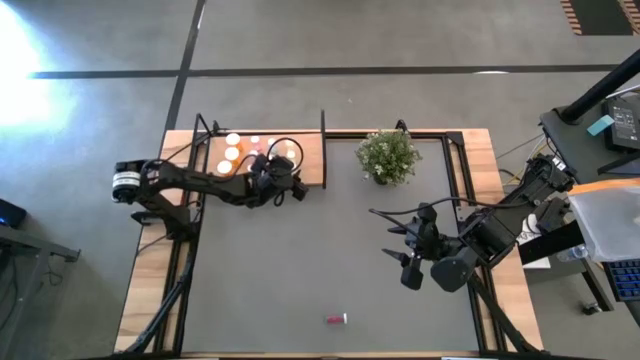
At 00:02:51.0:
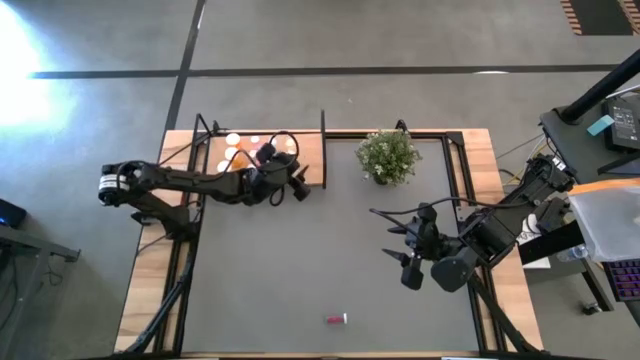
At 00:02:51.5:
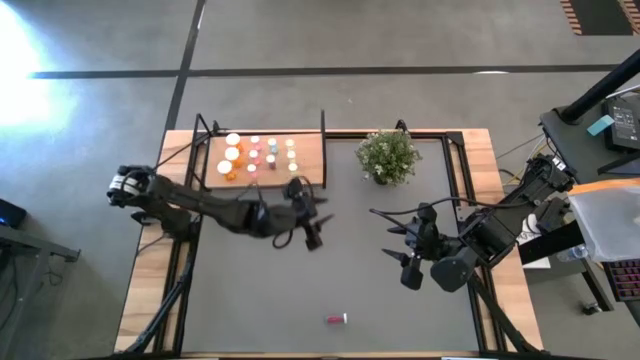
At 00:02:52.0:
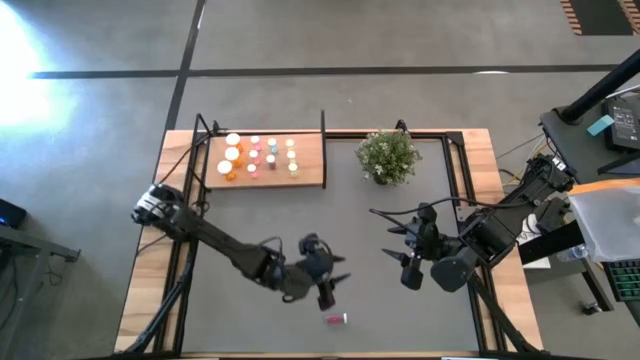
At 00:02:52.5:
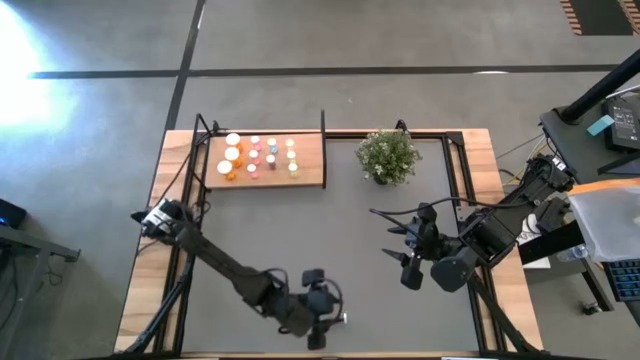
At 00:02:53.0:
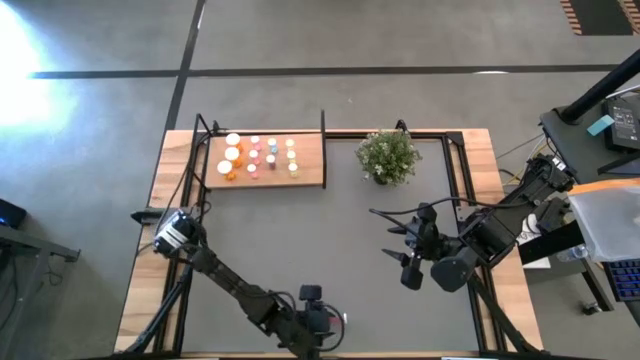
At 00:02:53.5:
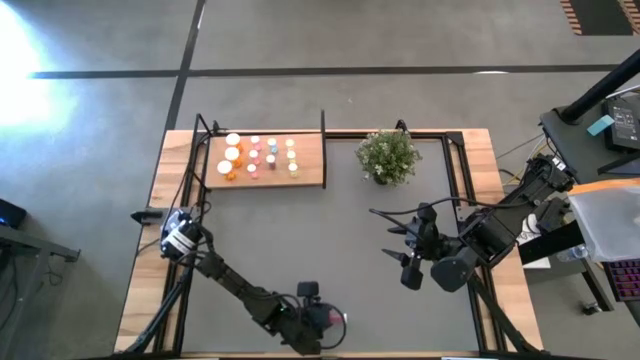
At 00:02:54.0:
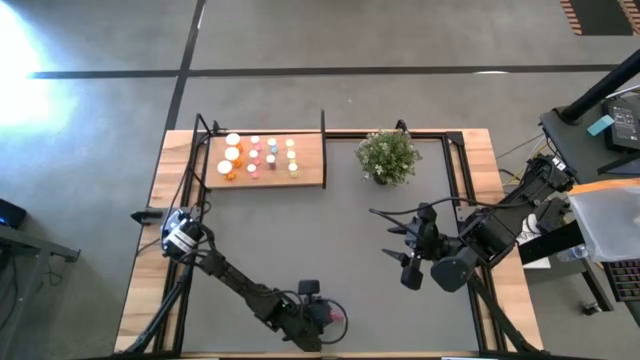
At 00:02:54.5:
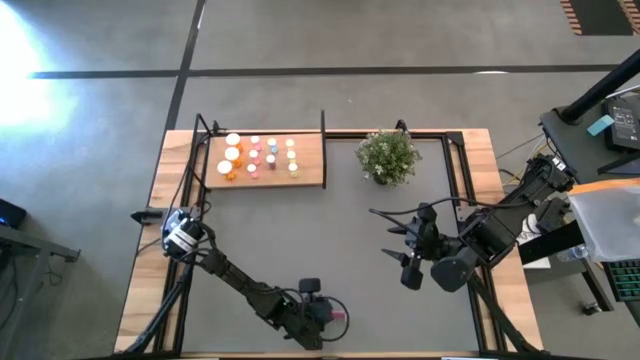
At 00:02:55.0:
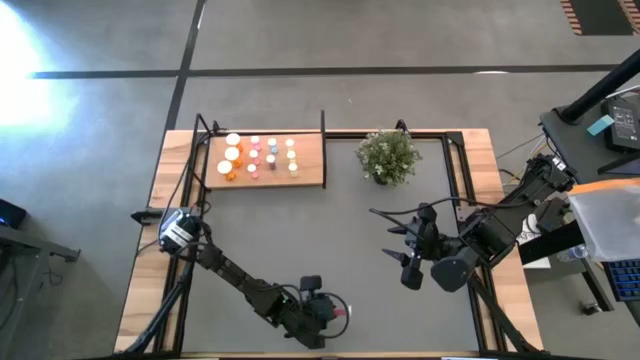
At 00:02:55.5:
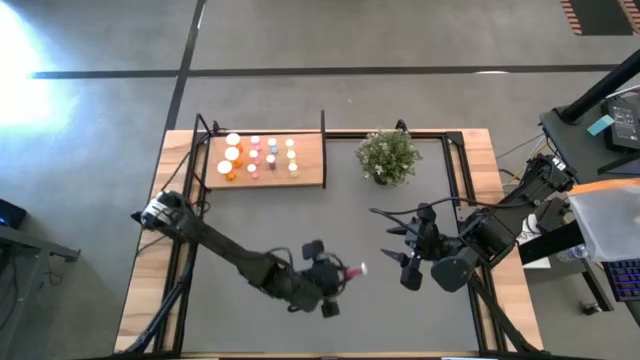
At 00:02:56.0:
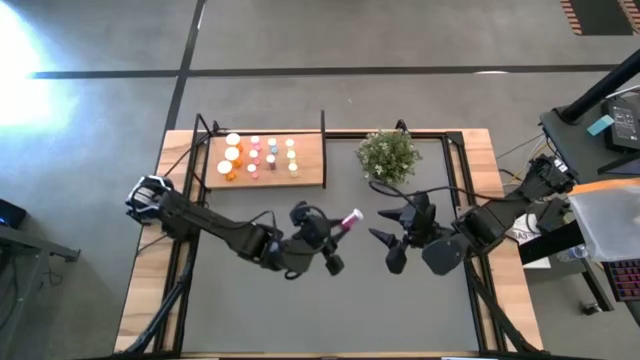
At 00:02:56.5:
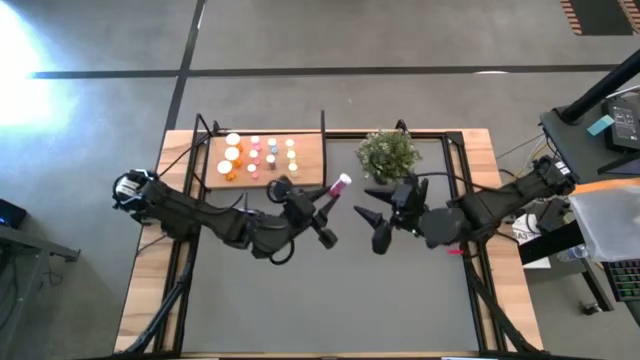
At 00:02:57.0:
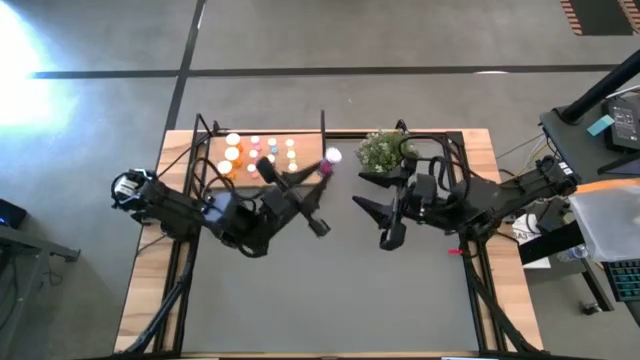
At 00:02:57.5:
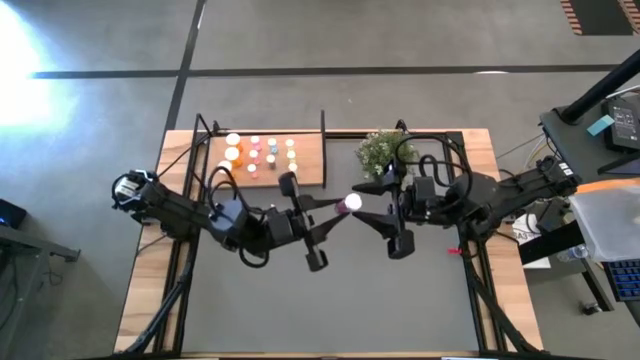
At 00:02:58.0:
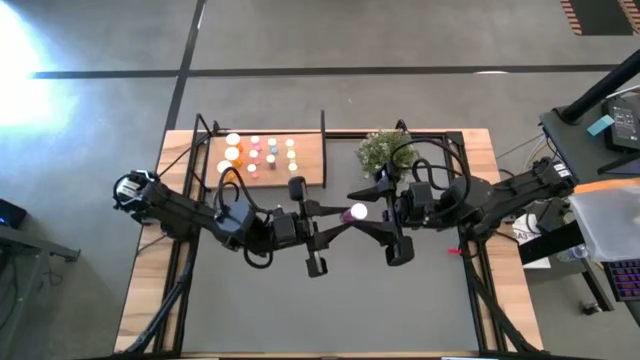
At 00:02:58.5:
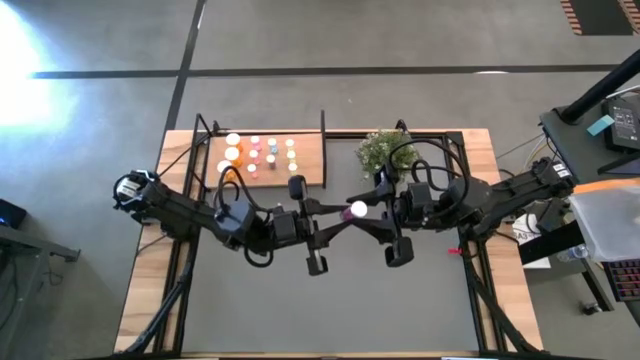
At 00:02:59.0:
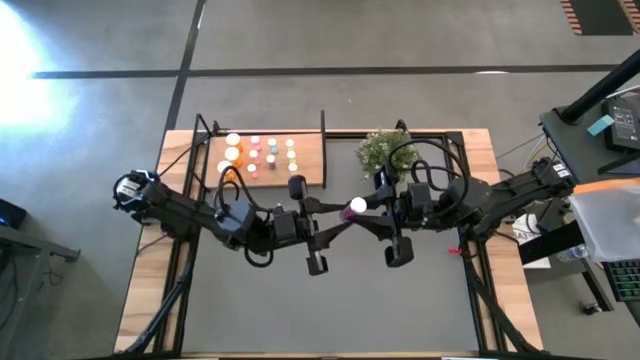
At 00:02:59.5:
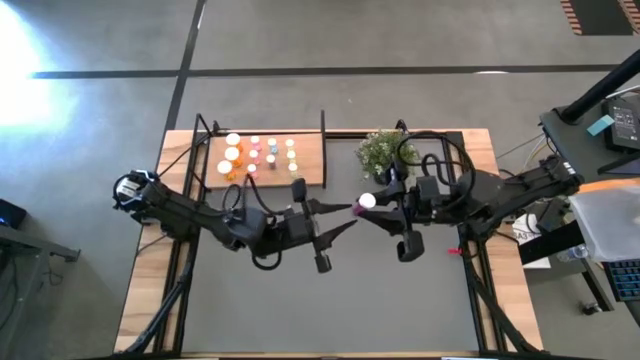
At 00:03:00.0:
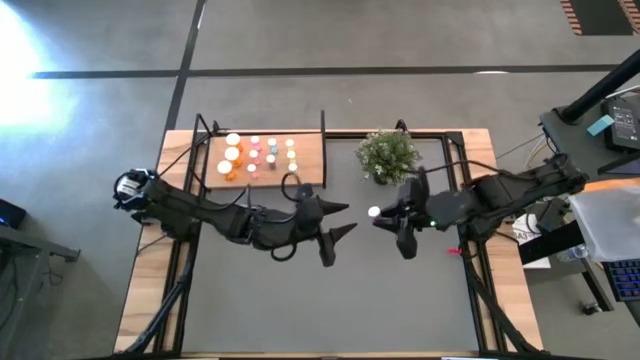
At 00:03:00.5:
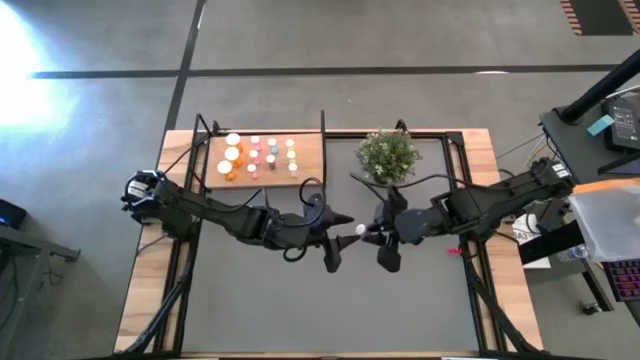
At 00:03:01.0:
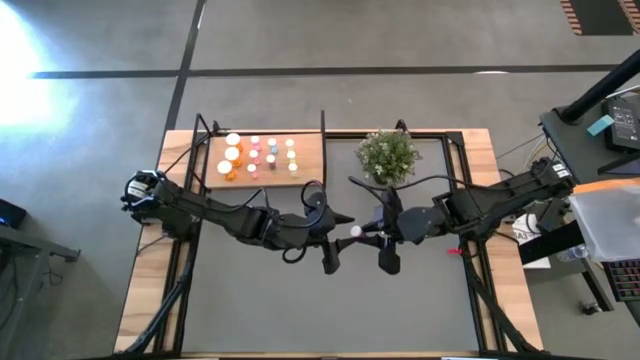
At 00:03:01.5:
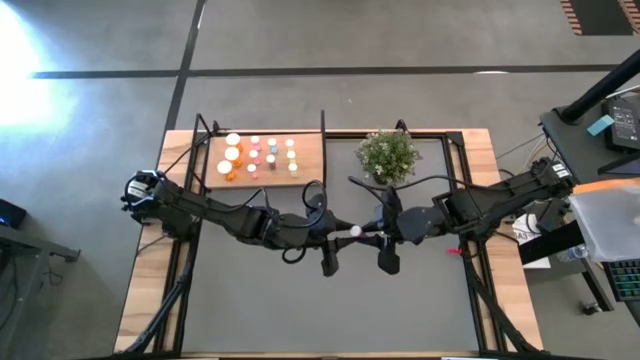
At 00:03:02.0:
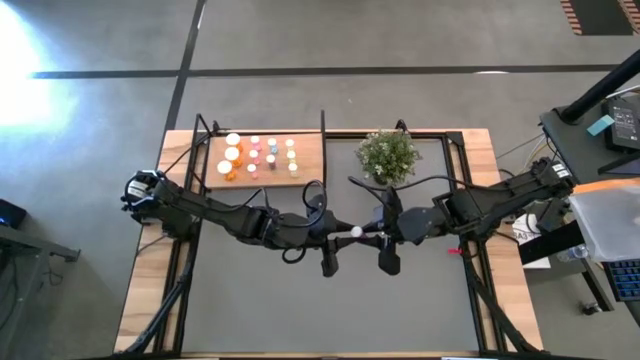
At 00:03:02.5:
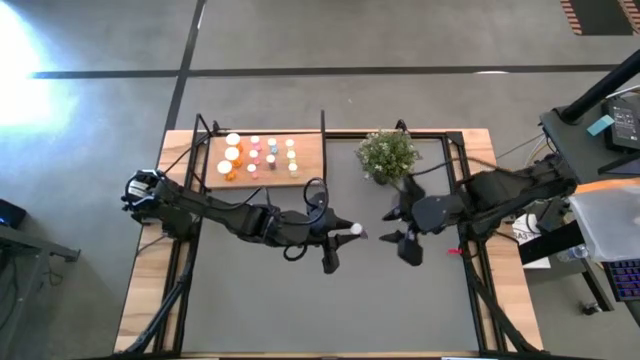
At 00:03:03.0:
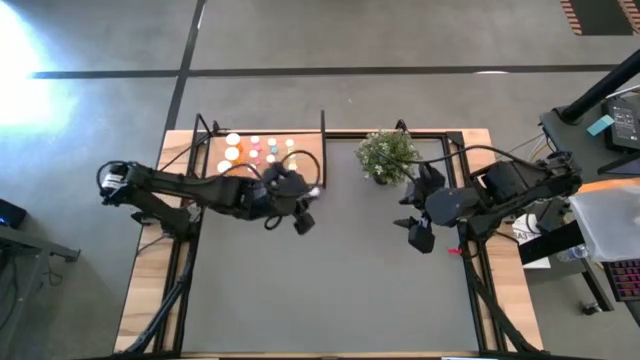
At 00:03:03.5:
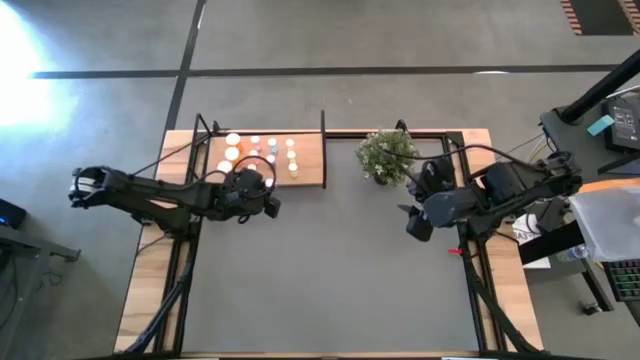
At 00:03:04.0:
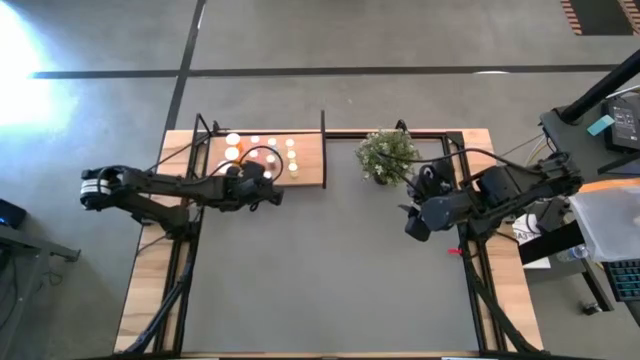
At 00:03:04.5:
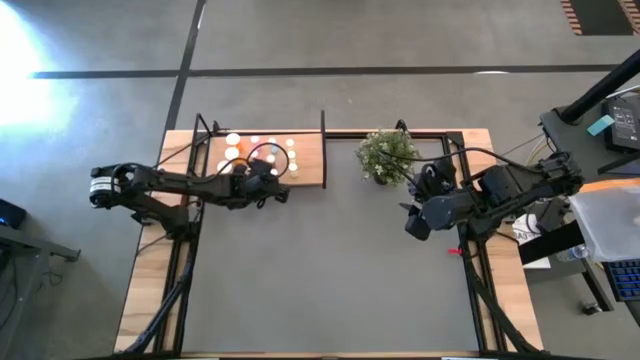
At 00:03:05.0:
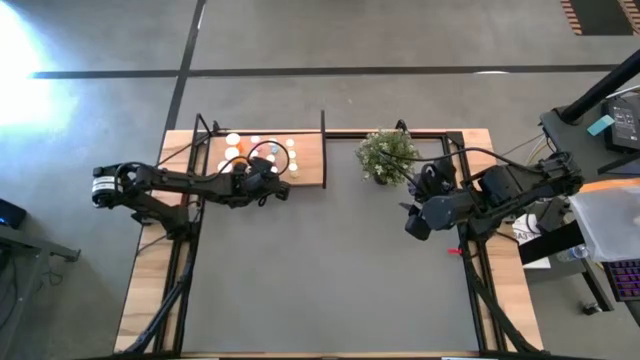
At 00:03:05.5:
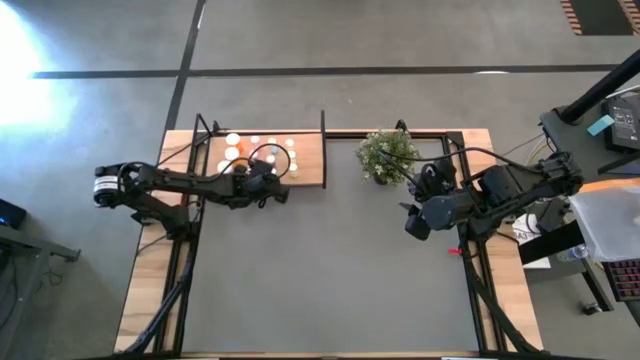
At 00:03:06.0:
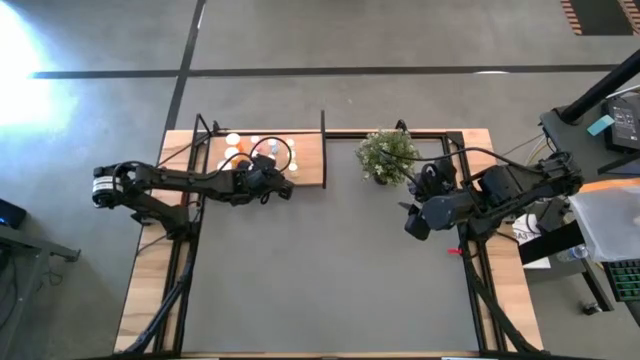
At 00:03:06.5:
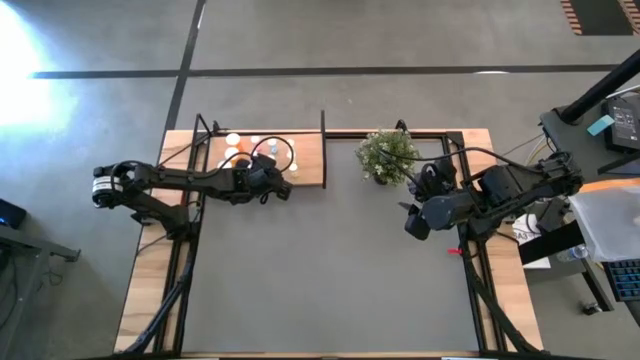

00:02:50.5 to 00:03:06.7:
Task: Pick and place medicine bottles onto shelf by color
Put the small blue pill bottle on the shelf aligned with the other small blue pill bottles

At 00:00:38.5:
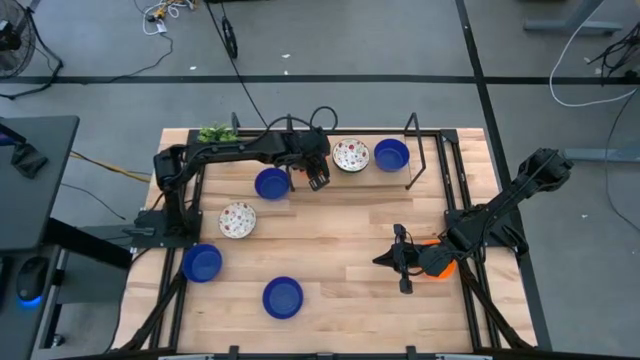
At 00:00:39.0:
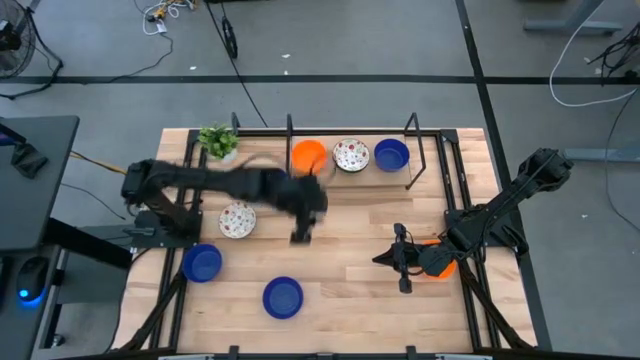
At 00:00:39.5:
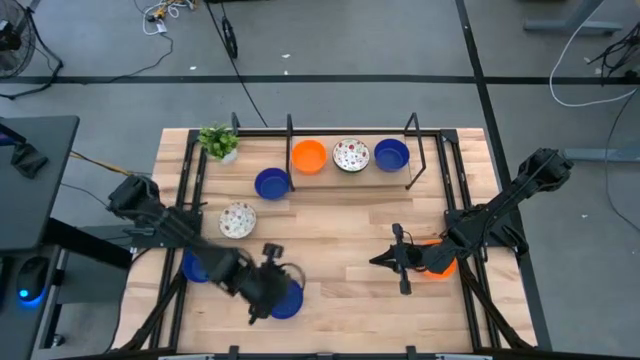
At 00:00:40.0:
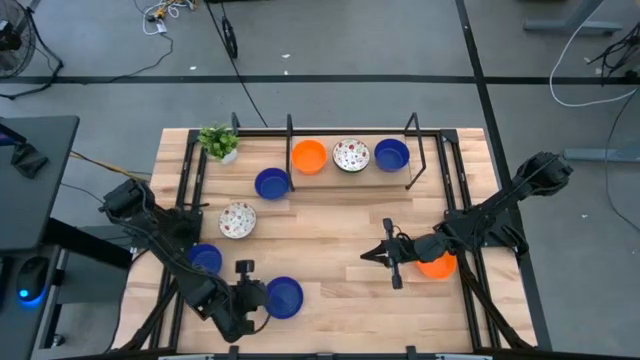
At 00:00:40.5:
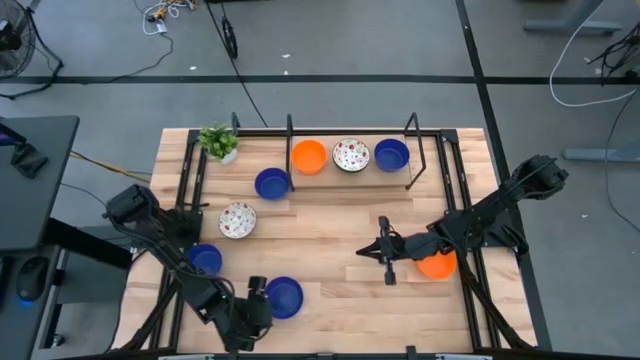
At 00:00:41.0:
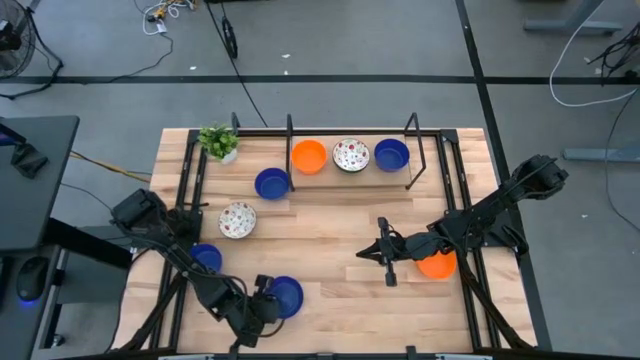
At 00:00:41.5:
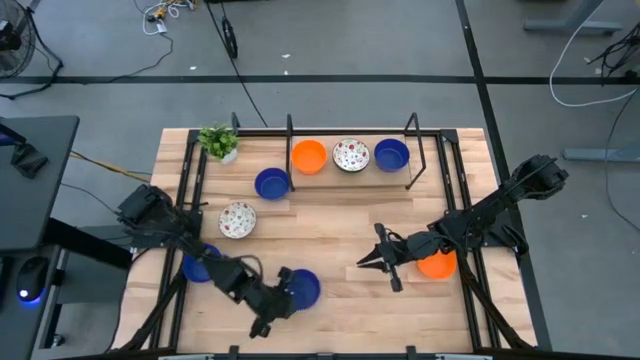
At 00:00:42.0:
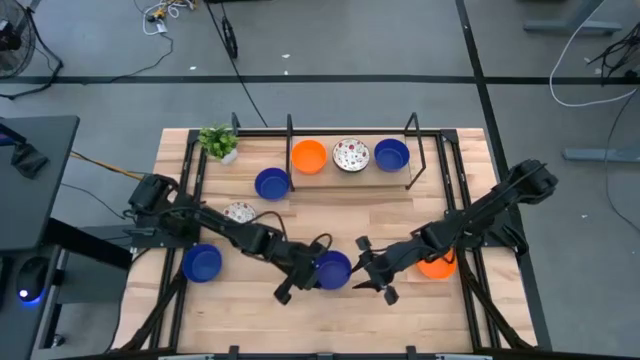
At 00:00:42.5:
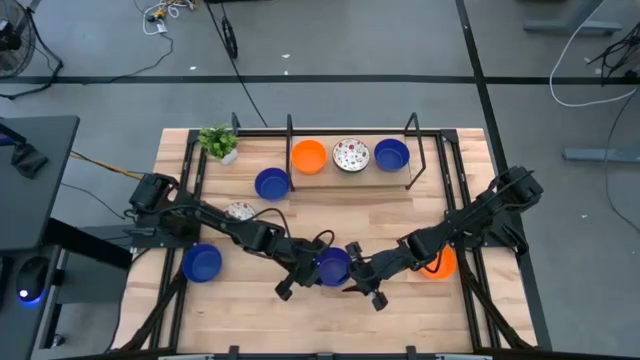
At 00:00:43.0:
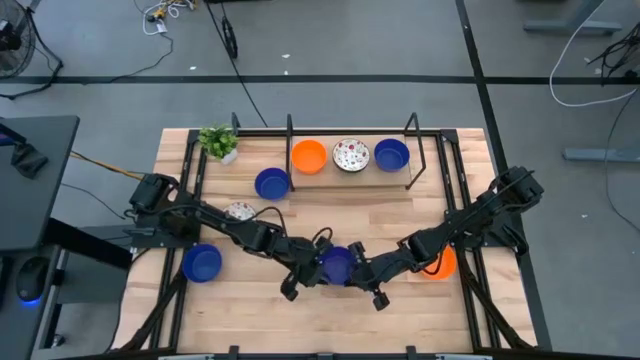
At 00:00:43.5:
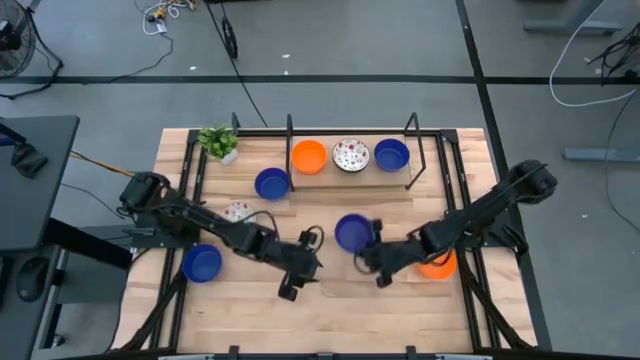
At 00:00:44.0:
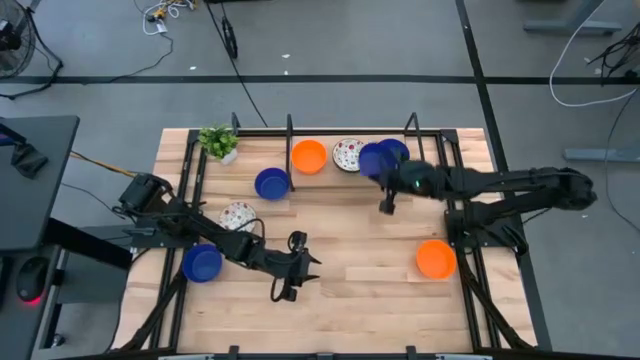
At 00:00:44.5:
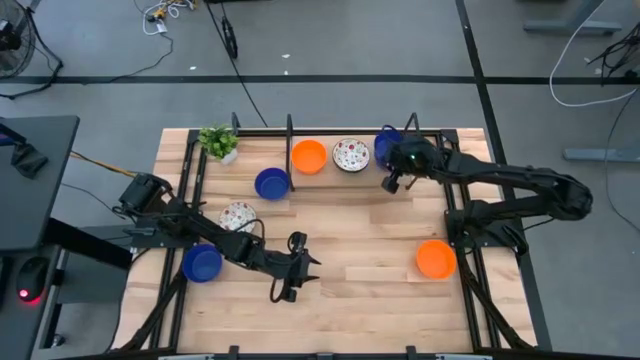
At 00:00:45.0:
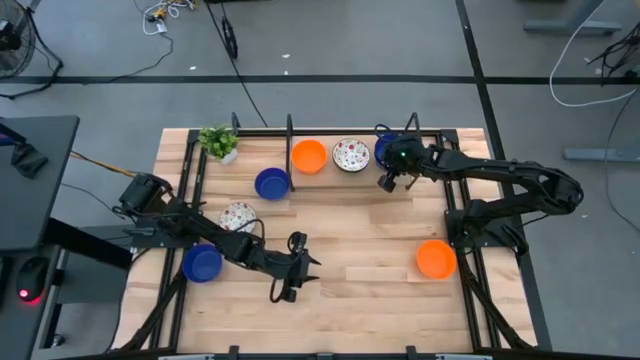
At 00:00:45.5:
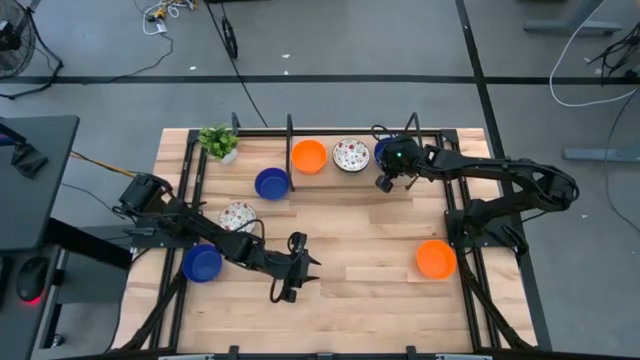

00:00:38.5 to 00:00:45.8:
Task: Pick & Place Mini bowls
Stack the blue bowl on top of the blue bowl on the shelf
